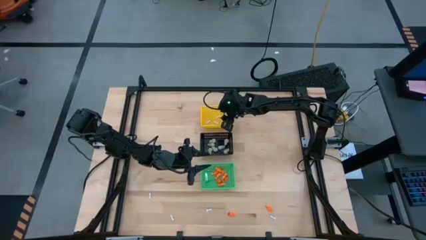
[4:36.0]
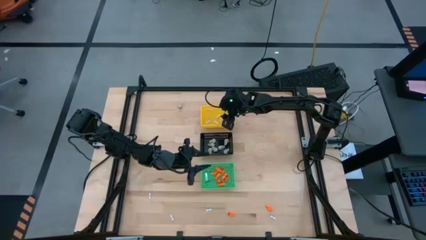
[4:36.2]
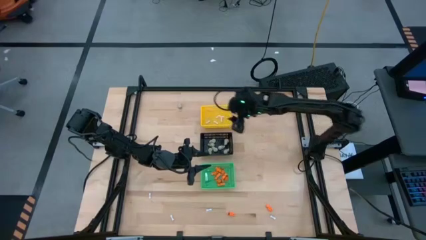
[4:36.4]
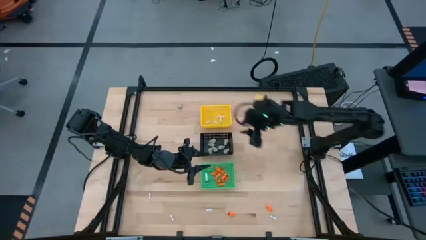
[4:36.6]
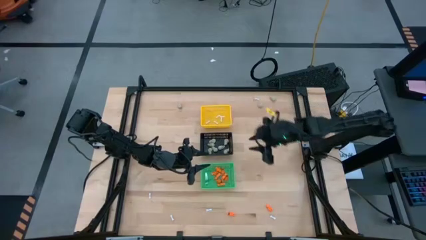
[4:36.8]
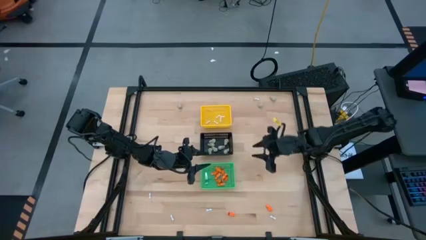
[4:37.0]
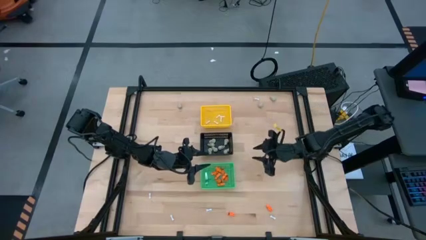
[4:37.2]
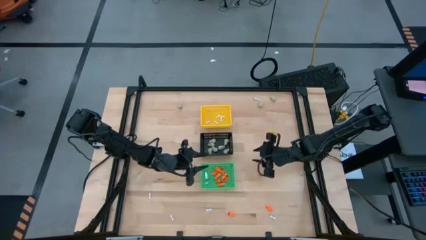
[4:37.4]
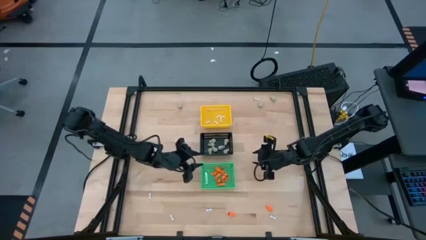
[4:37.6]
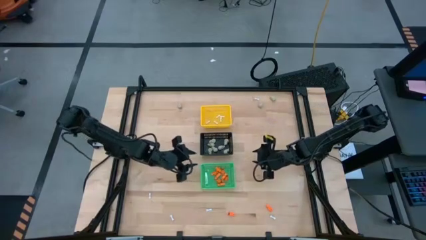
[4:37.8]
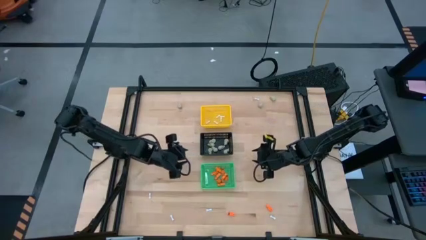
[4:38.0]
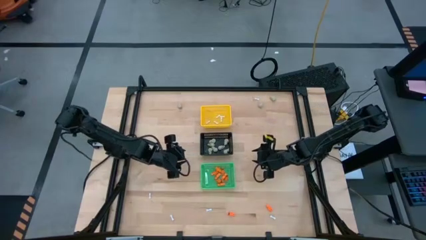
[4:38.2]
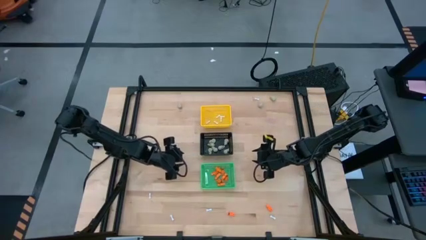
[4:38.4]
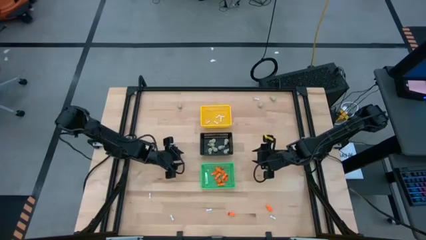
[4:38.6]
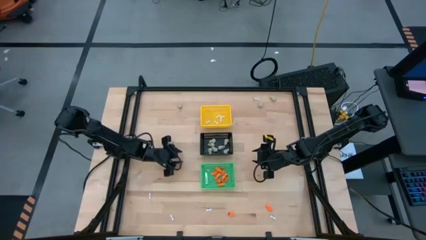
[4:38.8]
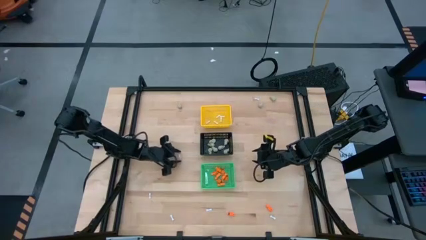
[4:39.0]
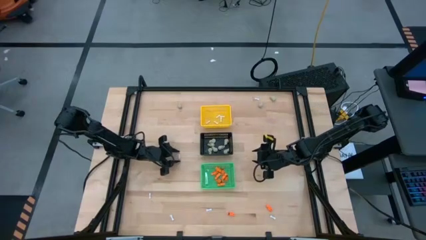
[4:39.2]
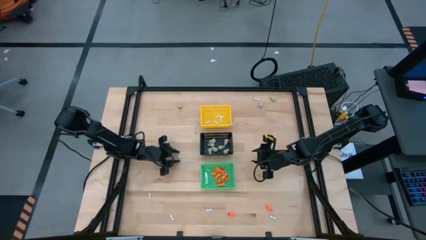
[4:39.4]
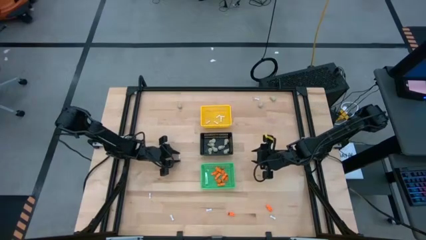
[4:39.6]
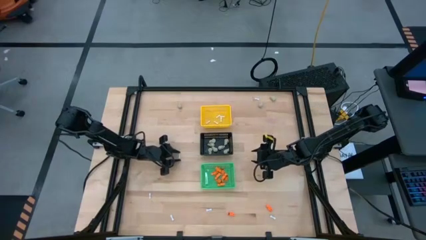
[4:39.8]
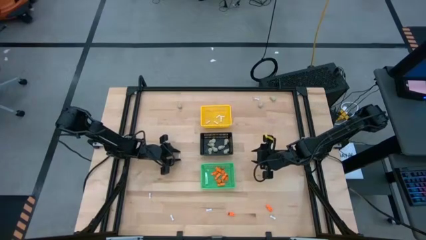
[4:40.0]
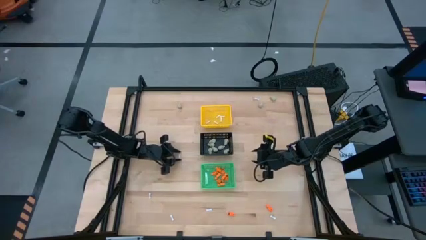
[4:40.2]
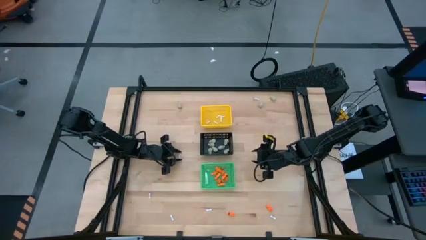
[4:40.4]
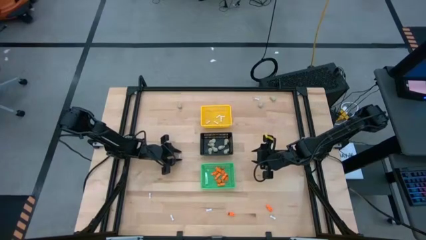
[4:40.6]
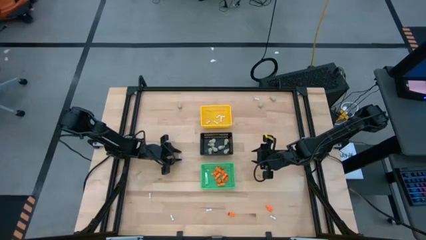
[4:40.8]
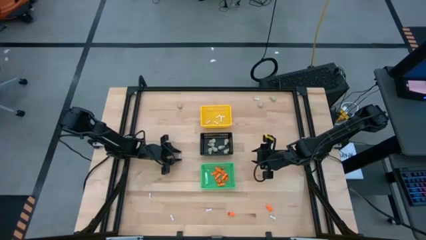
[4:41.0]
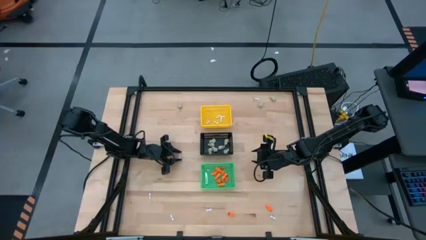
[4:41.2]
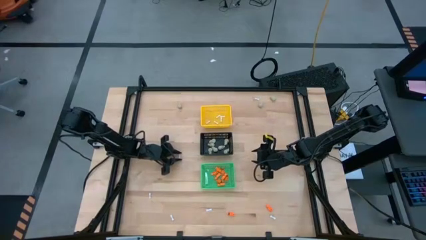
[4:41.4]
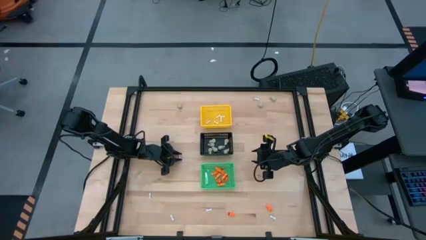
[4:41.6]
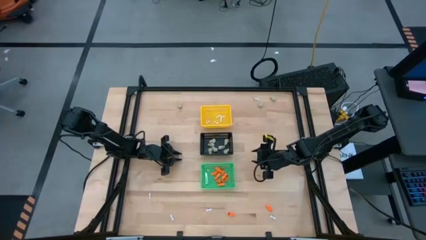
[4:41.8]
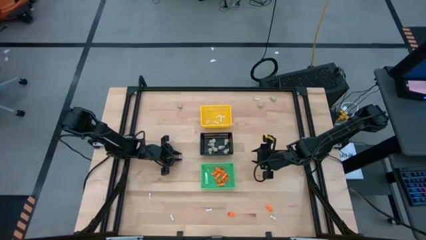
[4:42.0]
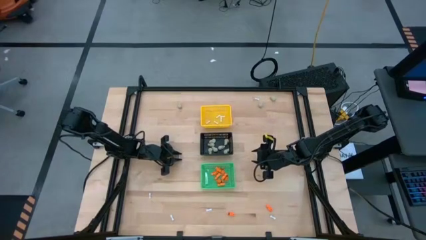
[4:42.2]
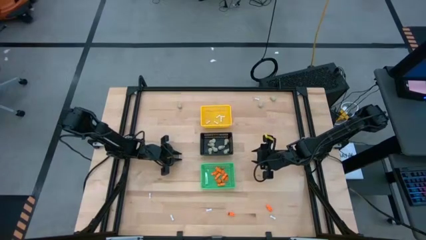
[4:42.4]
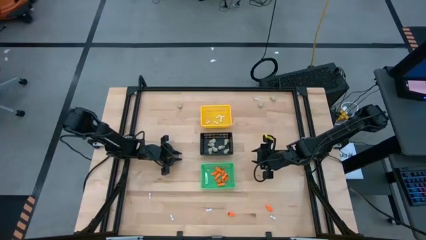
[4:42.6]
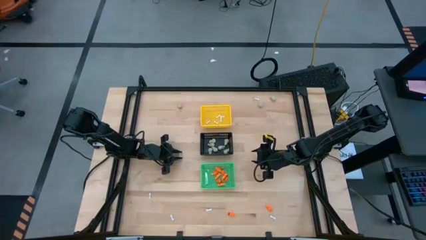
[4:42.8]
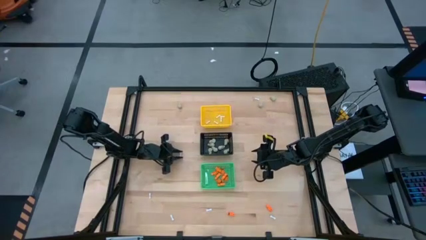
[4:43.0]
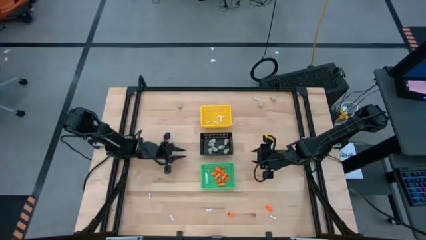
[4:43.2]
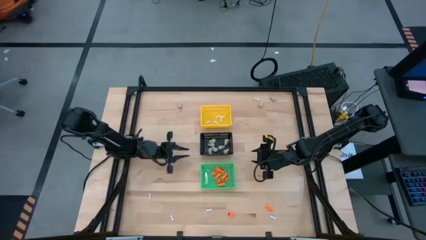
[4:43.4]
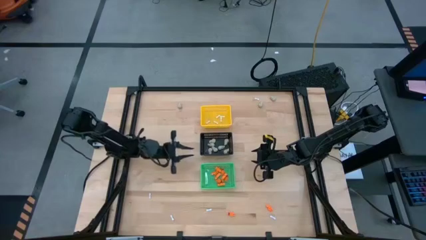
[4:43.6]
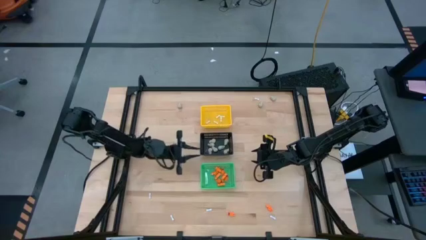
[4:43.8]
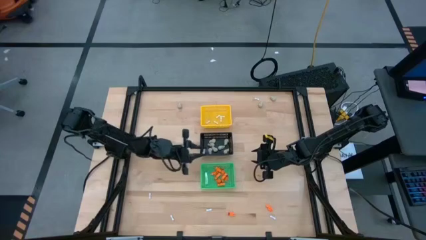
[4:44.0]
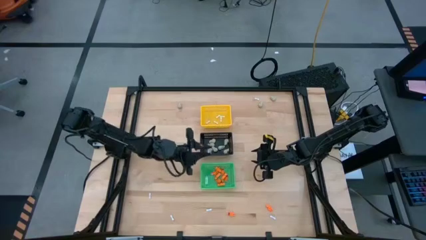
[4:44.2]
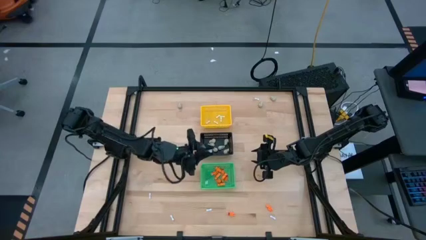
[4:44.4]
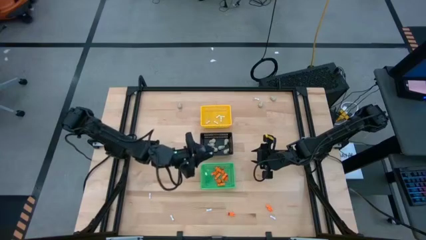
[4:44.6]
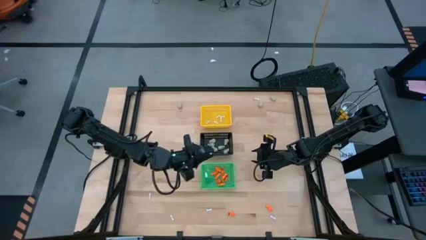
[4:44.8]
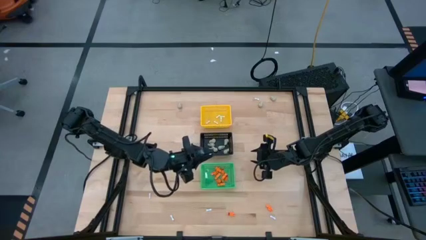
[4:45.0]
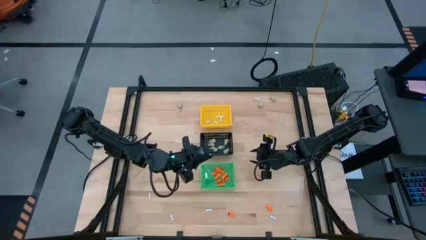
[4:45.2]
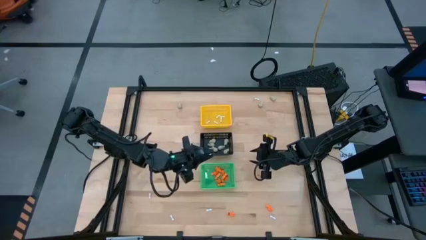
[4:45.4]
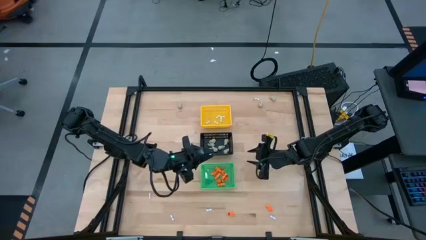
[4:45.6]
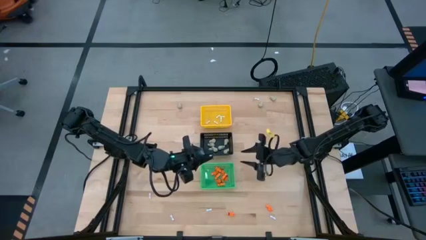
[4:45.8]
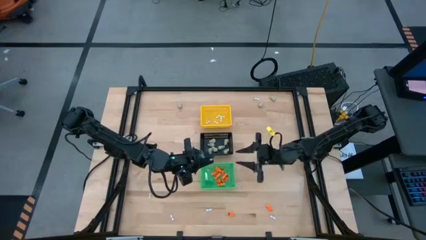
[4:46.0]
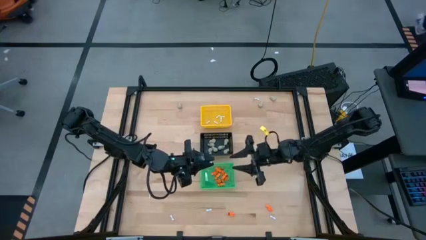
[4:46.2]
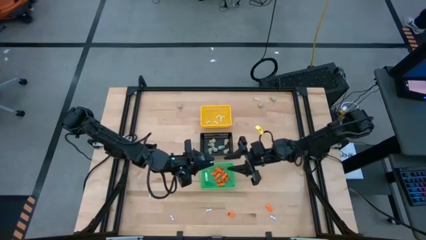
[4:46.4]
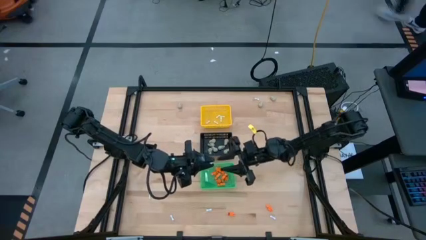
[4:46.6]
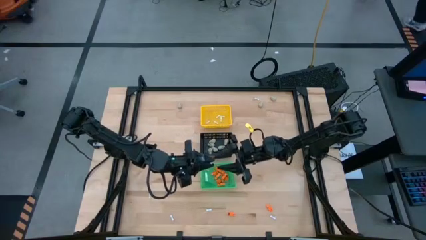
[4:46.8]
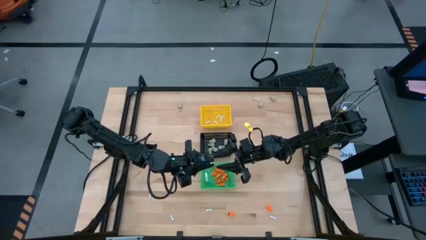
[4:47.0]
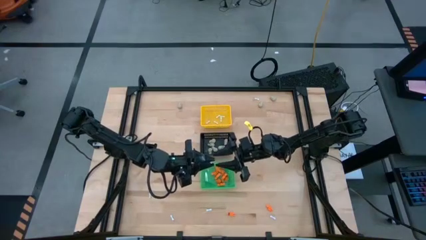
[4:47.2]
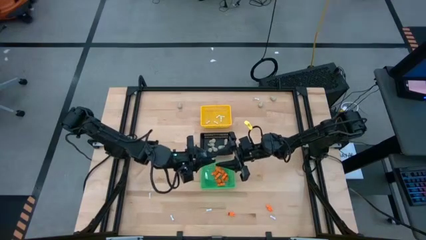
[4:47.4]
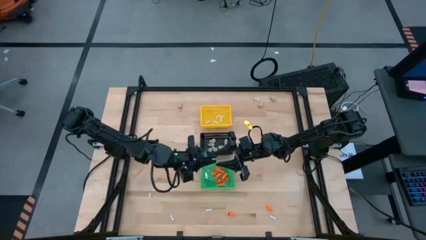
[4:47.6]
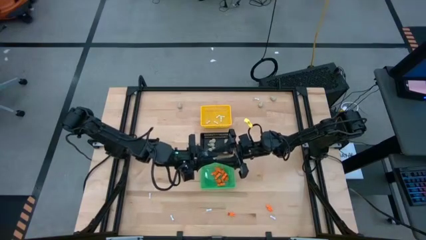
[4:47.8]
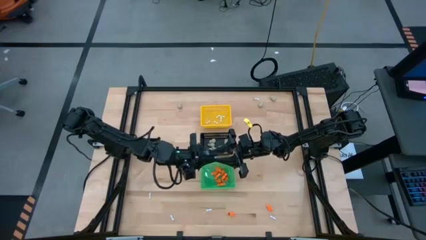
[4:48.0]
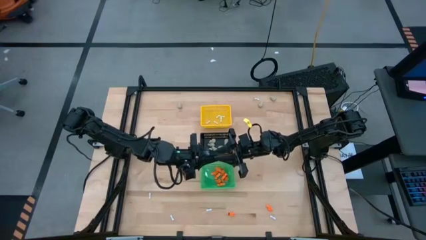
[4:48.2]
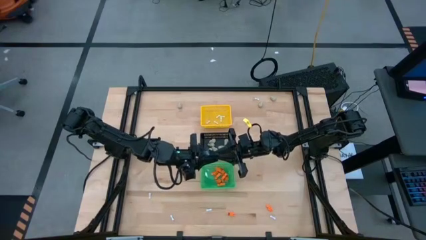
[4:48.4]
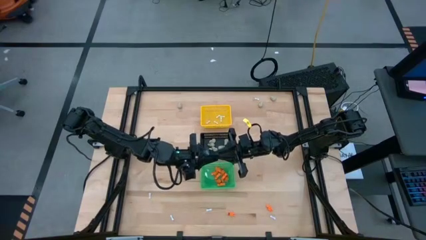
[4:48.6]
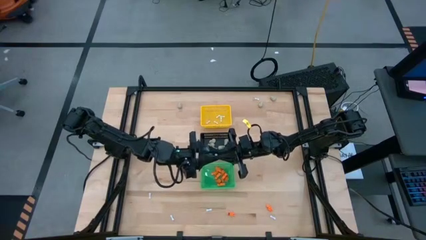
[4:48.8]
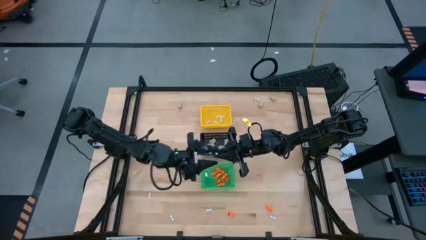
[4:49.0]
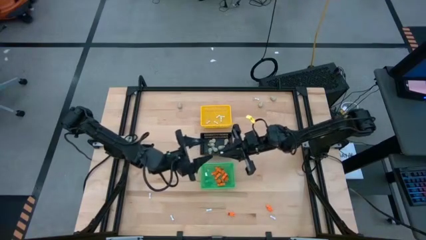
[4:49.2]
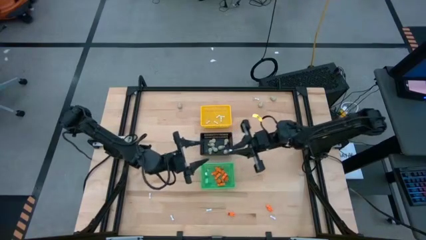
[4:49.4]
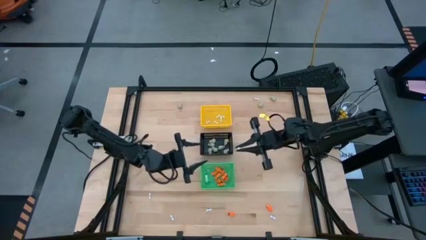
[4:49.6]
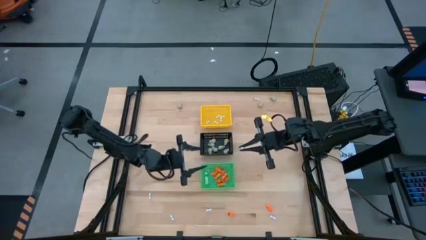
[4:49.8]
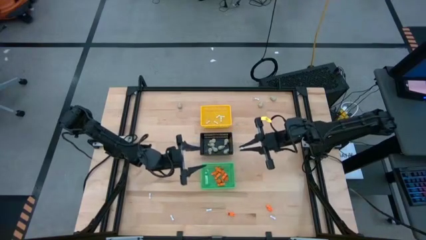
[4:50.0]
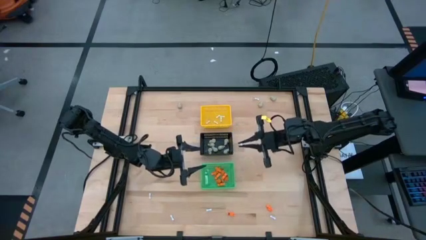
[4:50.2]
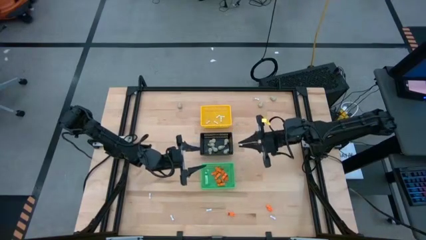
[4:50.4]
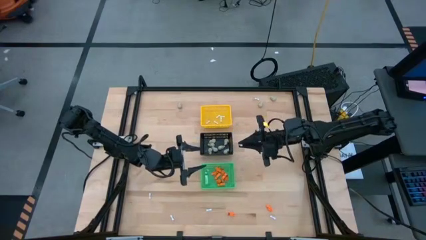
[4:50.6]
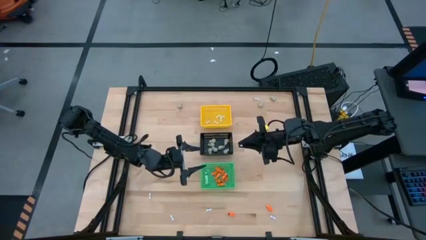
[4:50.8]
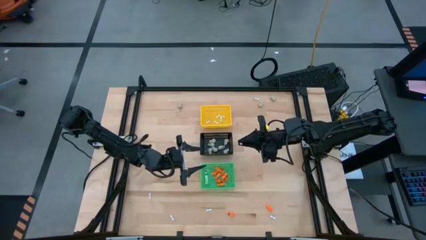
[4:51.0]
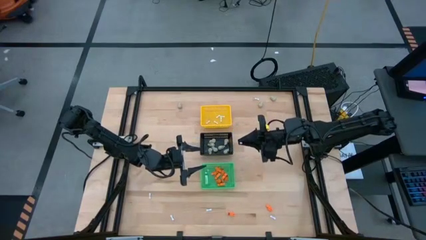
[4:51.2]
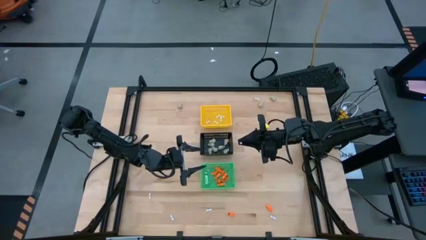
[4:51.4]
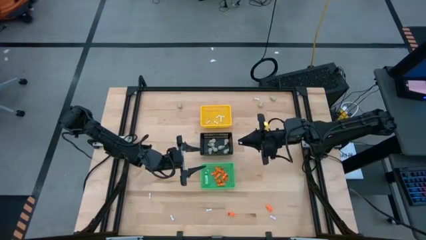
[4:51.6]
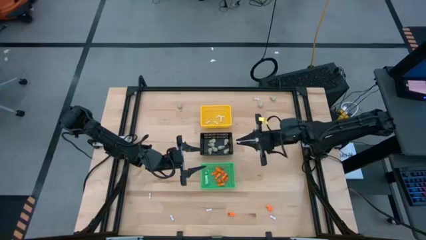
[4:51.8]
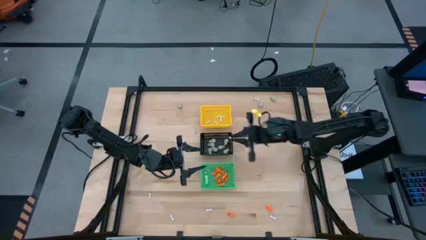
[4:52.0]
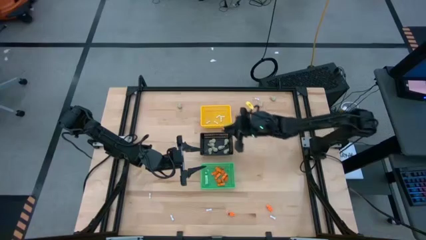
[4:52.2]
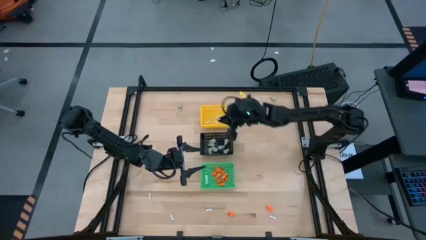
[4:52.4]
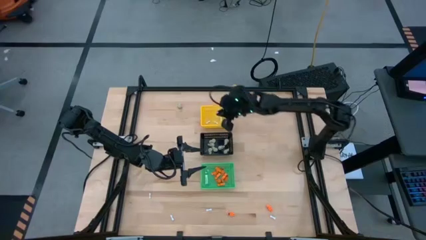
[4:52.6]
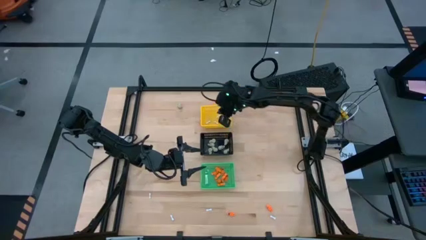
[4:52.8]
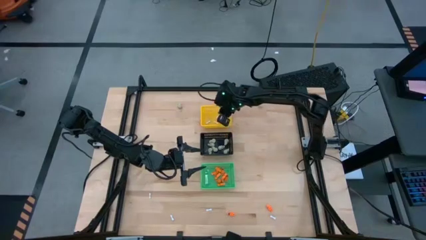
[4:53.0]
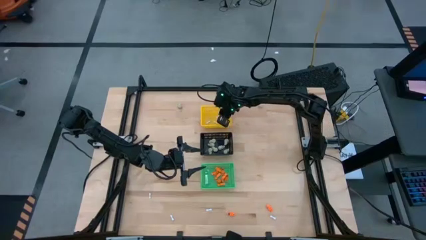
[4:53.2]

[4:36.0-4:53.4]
Task: Sort Halloween decoration
Put the white bone toy into the yellow basket
